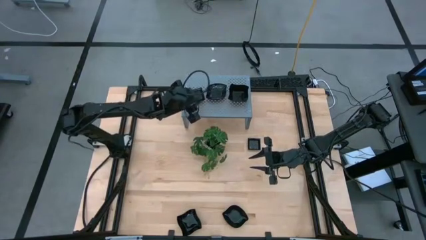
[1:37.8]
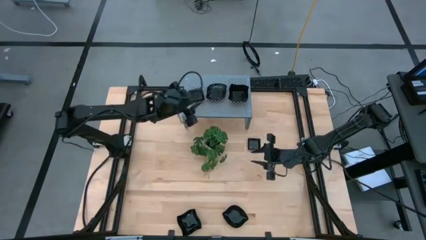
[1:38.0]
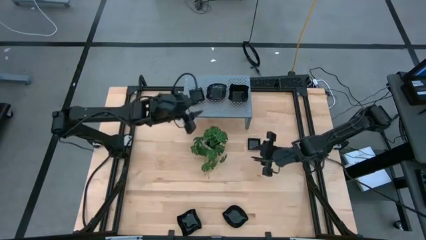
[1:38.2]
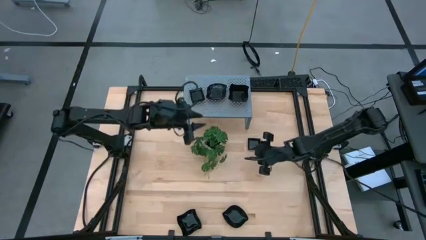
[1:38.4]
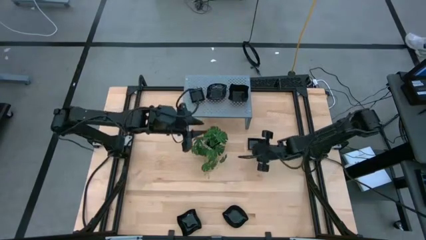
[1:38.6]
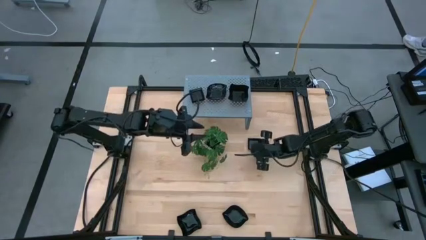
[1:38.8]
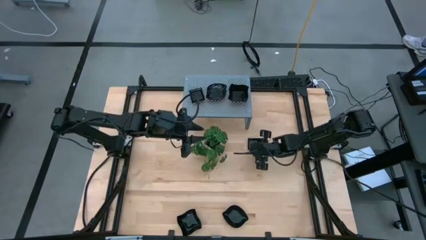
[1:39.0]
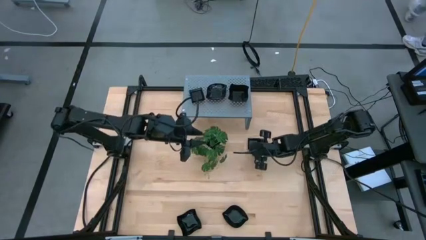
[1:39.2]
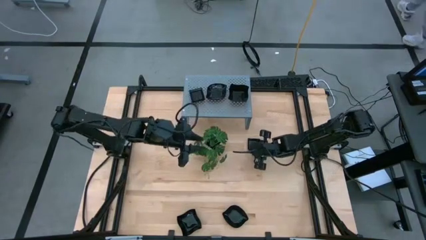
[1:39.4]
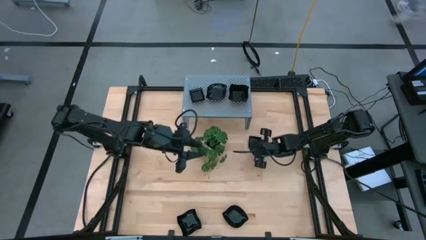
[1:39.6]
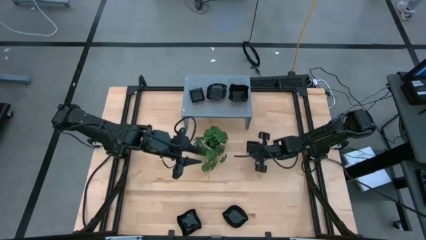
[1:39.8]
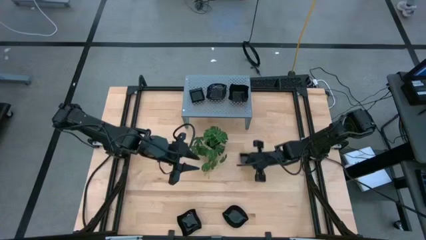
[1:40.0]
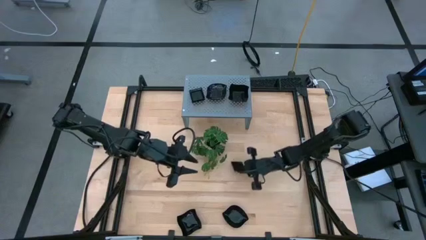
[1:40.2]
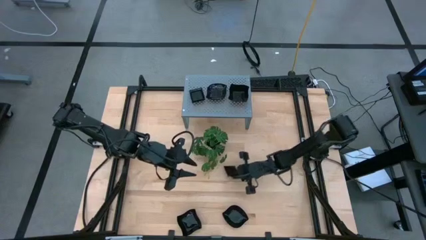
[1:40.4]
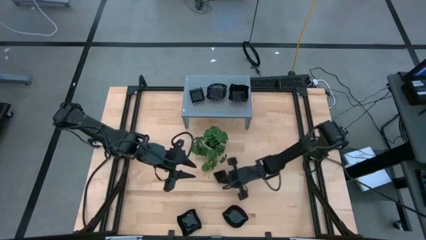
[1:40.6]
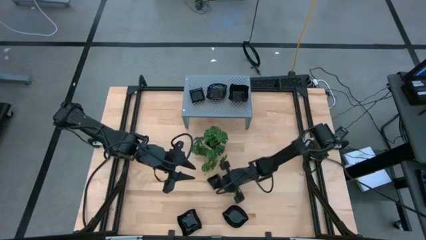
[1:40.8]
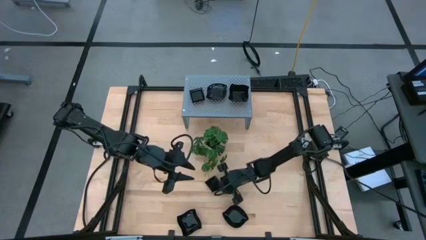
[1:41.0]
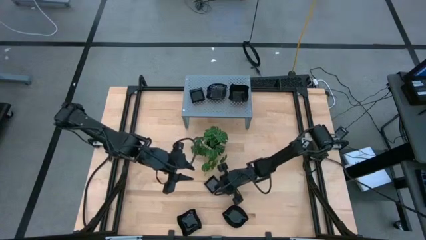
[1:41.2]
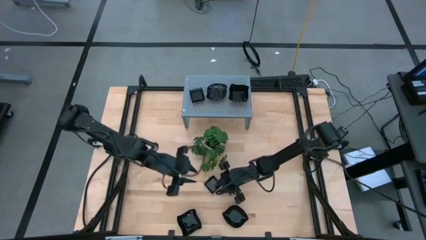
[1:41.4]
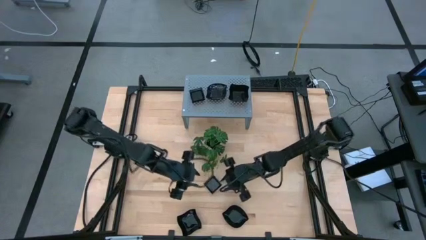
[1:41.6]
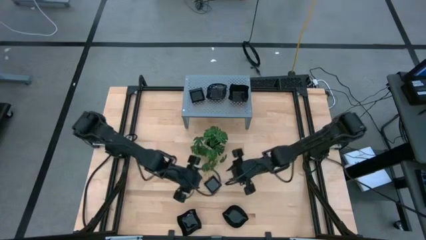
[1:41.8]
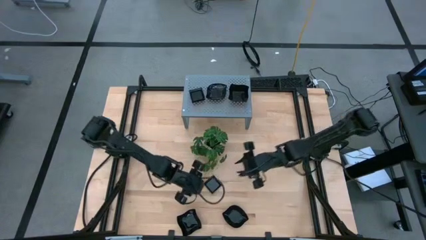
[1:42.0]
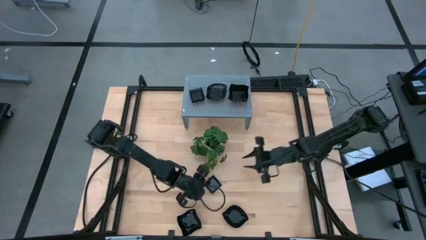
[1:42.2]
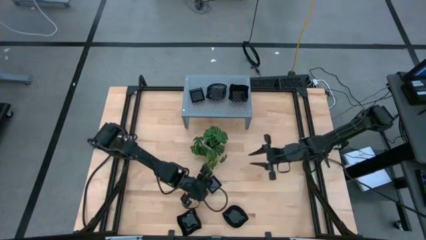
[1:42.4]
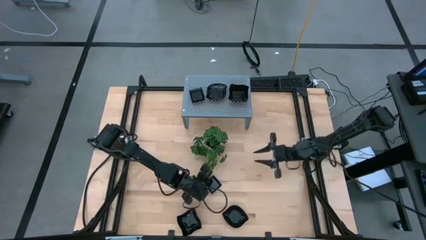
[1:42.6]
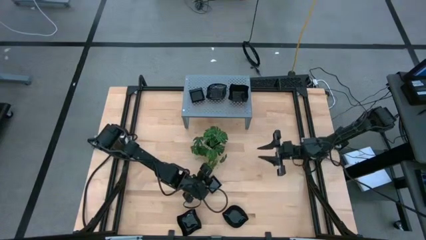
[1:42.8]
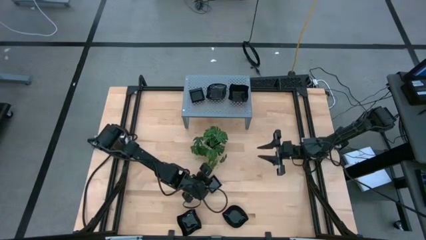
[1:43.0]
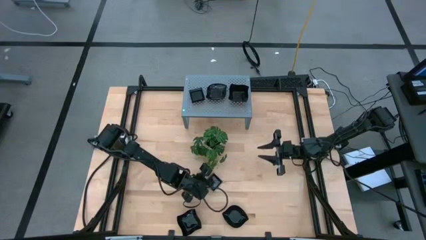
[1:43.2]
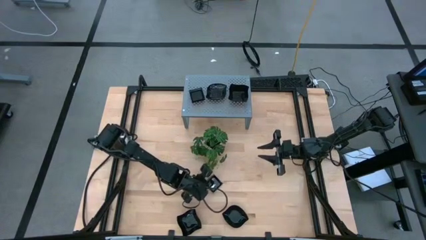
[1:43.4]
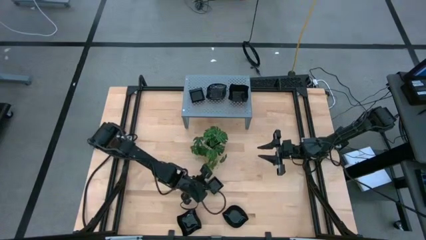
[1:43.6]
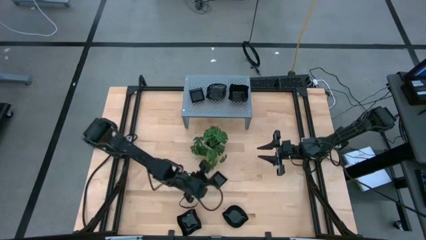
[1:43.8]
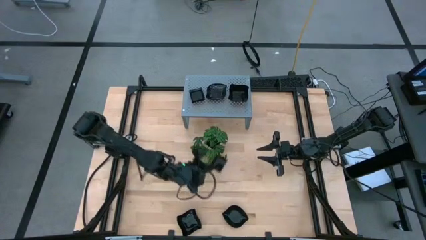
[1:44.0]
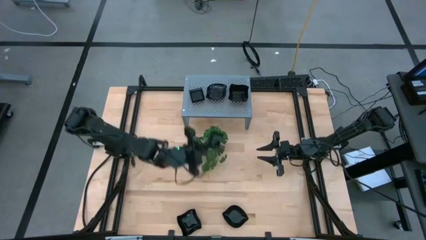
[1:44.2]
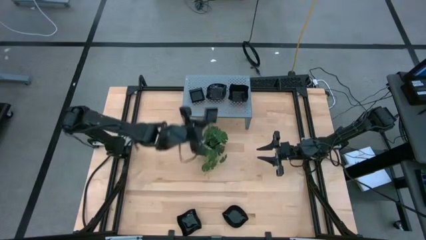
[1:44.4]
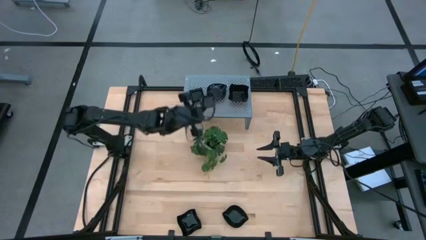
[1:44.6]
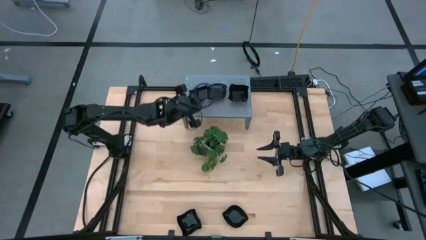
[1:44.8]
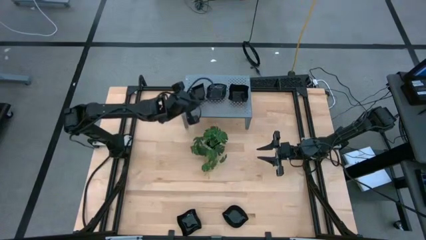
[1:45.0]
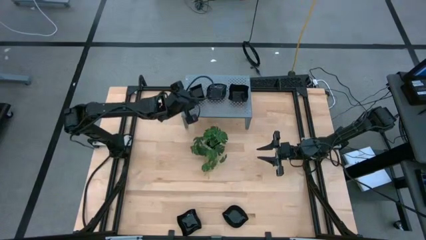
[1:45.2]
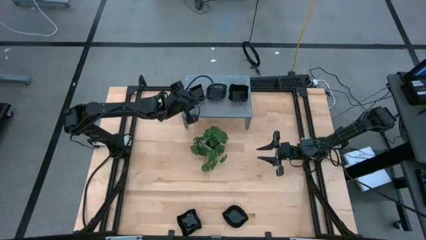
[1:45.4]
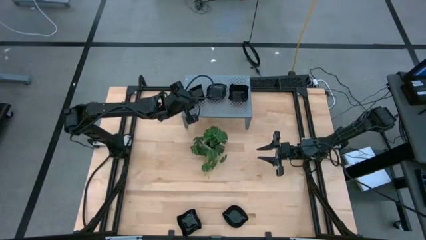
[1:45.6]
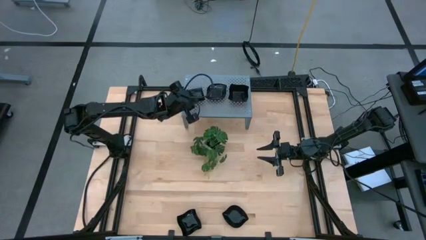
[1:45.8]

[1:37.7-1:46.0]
Task: Pick & Place Mini shaped plates
Stack the black square plate on top of the other black square plate on the shelf

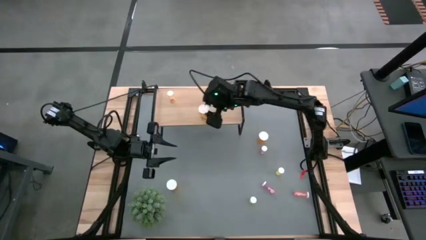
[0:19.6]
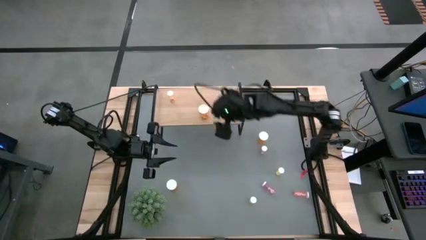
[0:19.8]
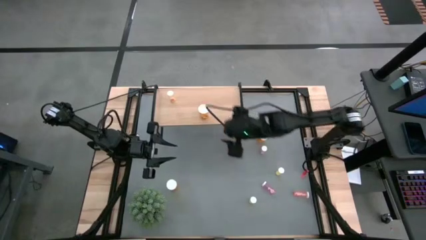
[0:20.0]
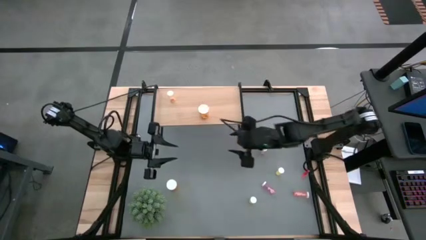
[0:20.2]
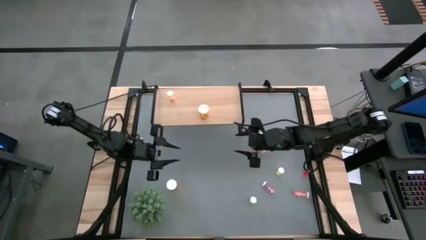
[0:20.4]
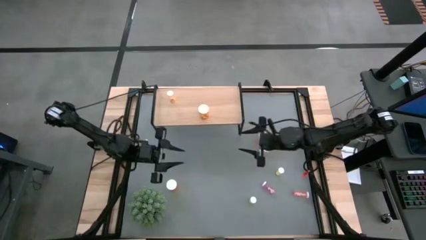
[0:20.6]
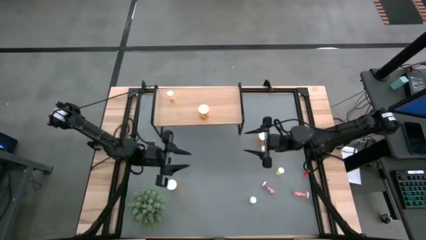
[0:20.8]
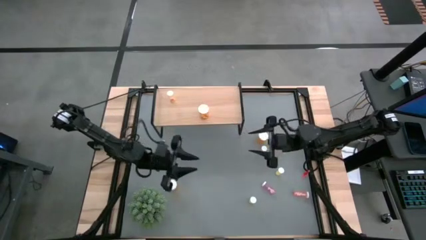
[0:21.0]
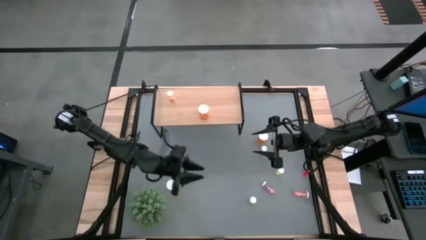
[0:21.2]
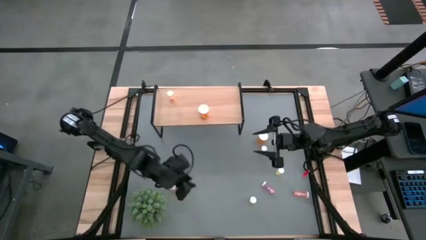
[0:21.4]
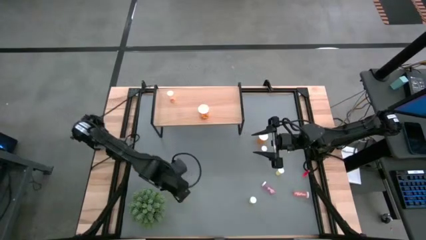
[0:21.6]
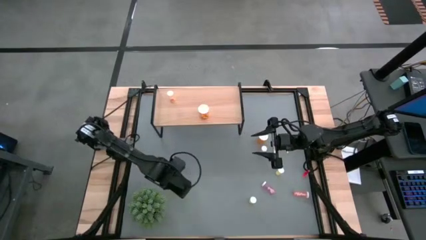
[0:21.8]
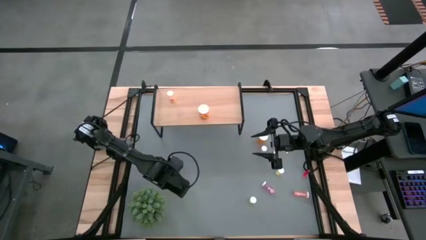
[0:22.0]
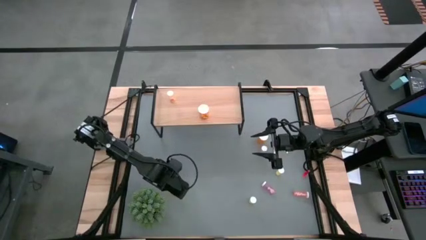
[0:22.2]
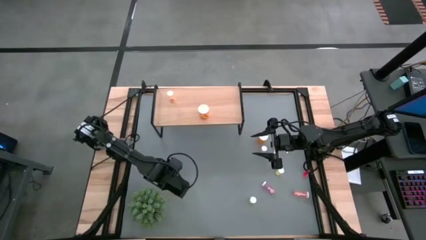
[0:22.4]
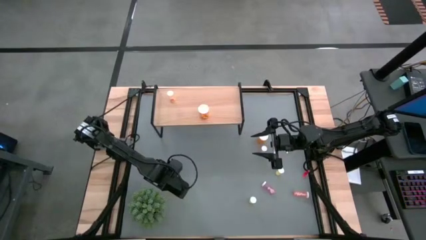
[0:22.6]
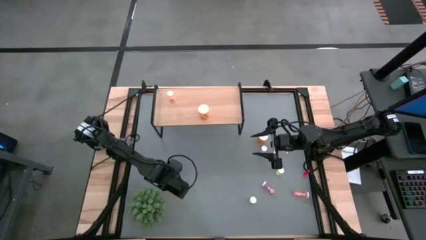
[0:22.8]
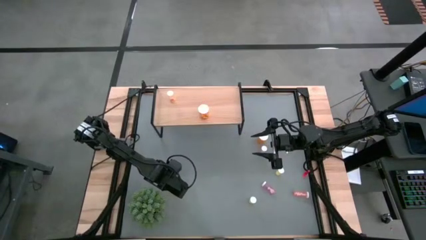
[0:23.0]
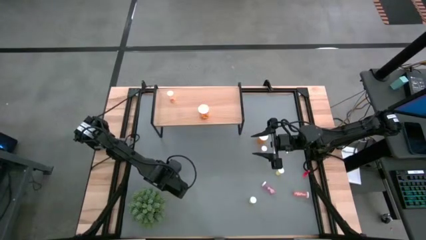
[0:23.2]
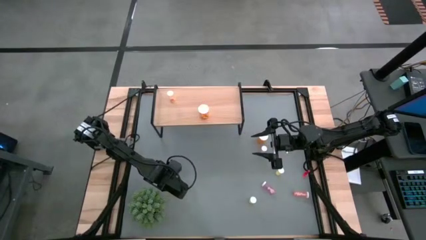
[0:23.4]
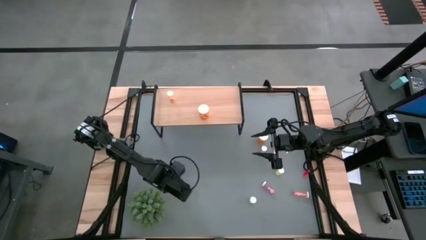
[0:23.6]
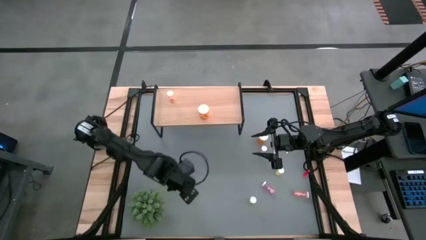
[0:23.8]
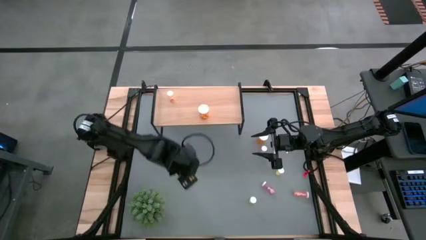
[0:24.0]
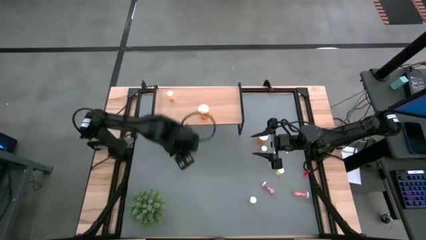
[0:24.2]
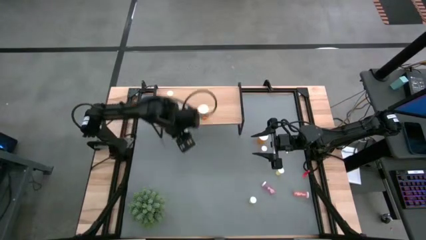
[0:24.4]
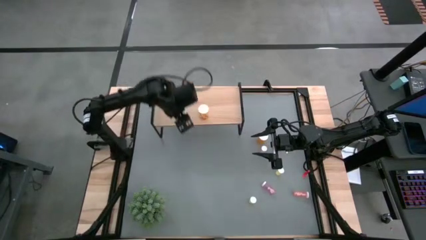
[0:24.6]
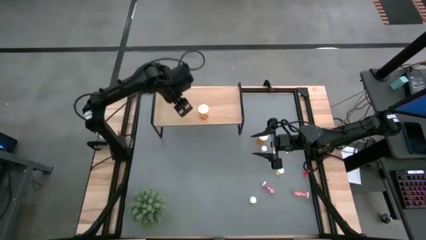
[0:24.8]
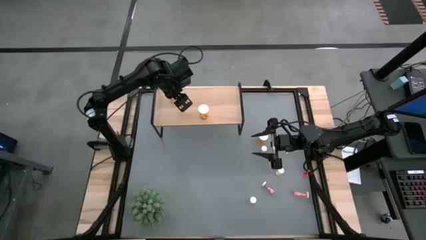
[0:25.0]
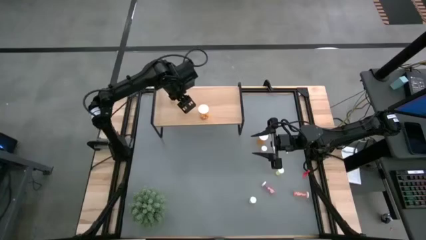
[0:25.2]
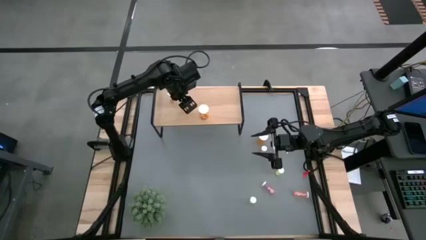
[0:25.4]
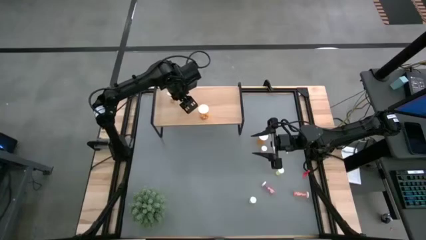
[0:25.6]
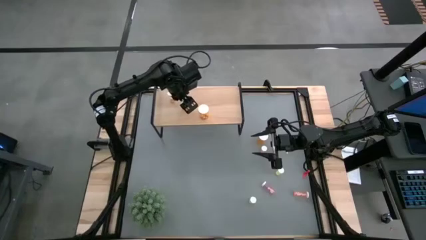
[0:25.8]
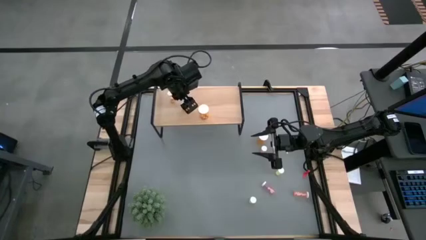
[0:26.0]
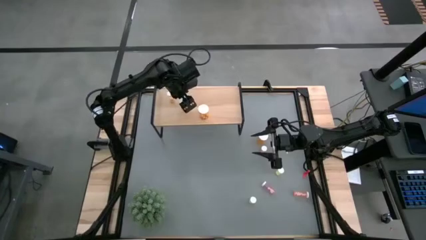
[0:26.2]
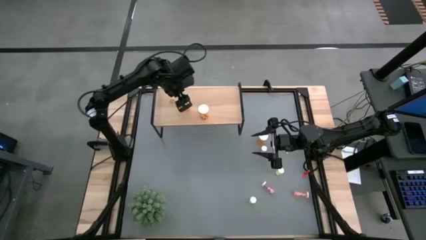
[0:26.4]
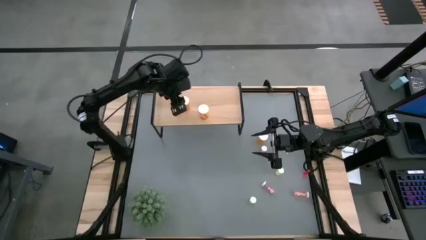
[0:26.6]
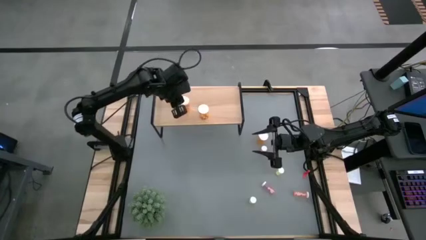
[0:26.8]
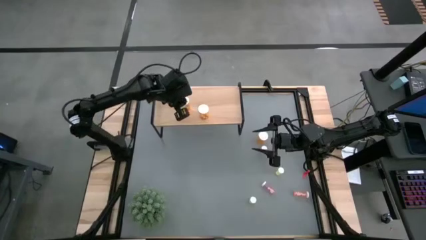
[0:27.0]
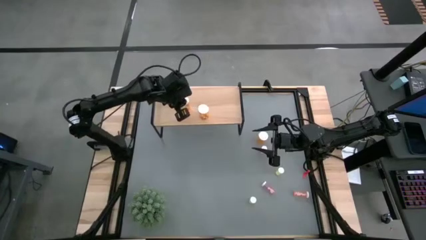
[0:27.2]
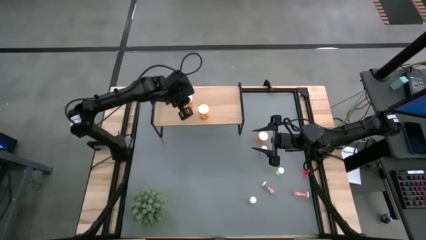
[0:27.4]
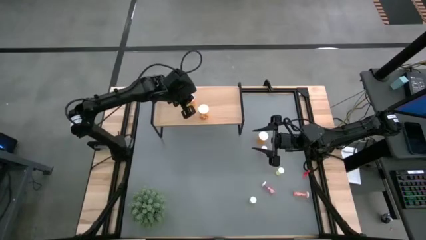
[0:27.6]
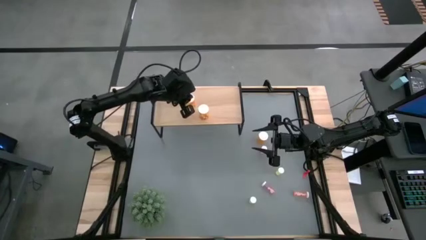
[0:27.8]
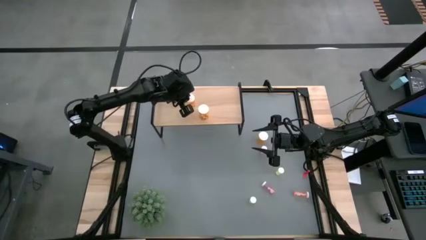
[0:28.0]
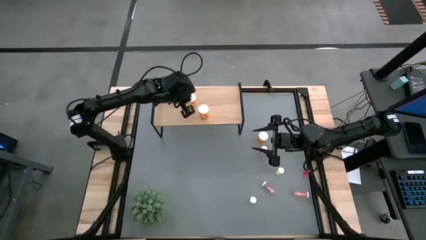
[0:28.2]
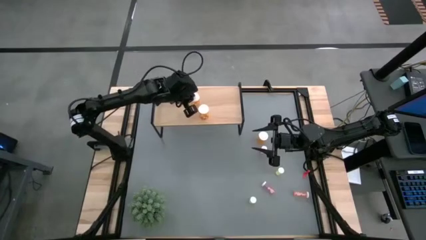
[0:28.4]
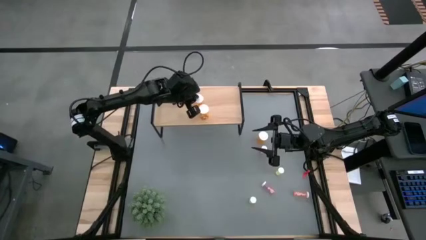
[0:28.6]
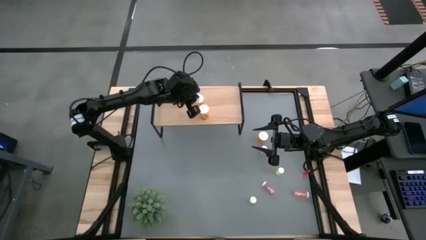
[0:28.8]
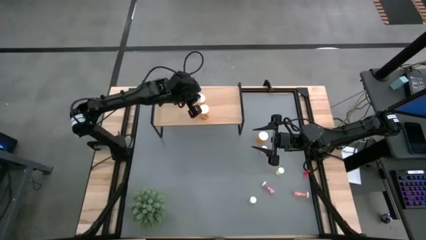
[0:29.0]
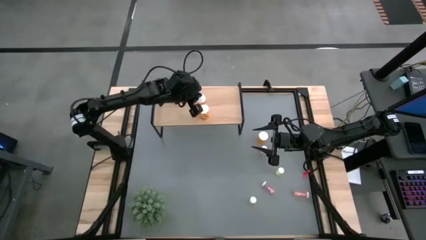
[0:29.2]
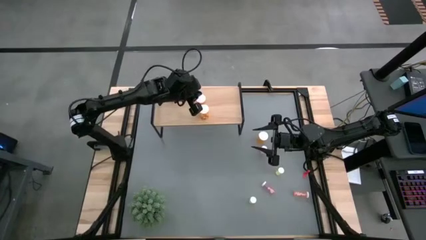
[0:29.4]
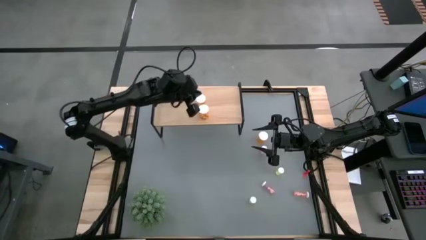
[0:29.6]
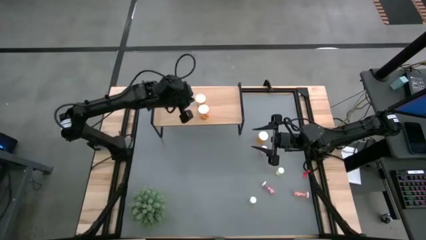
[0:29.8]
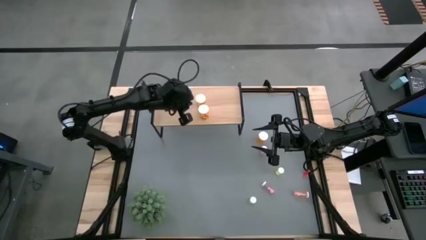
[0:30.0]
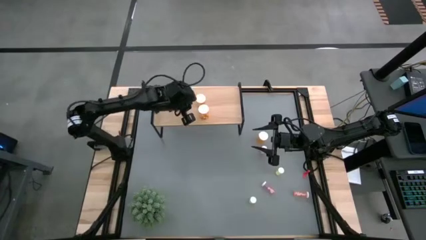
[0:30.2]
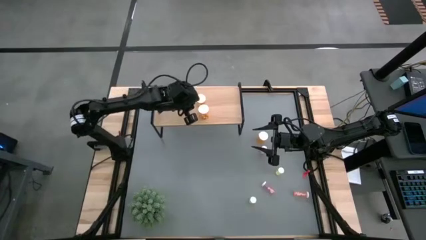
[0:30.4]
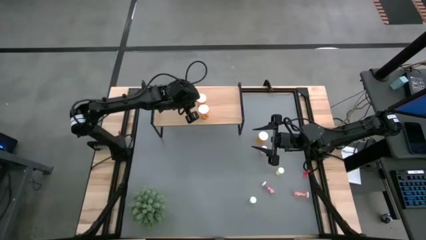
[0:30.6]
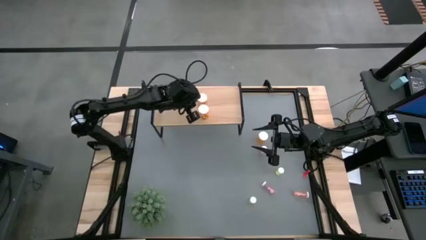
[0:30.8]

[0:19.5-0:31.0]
Task: Pick and place medicine bottles onto shelf by color
Put the bottom orange pill bottle on the shelf aligned with the orange pill bottle
